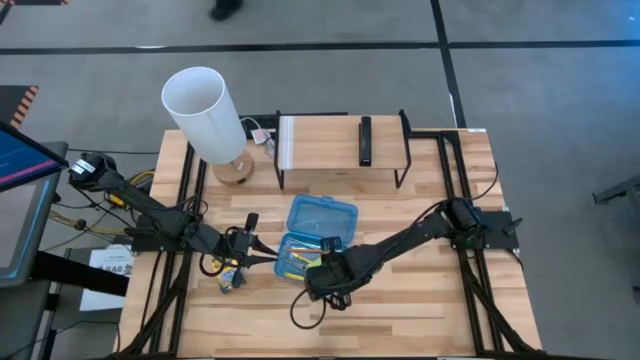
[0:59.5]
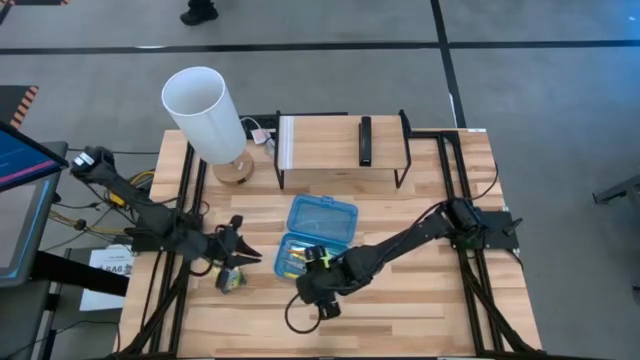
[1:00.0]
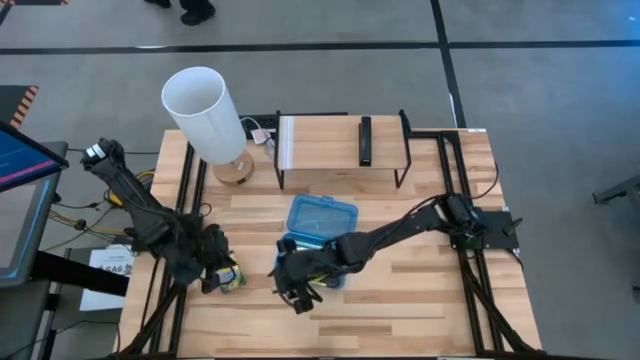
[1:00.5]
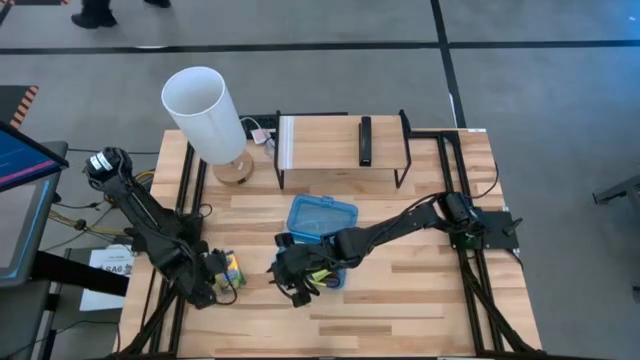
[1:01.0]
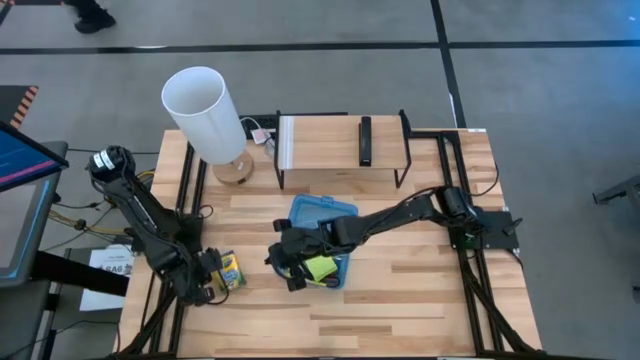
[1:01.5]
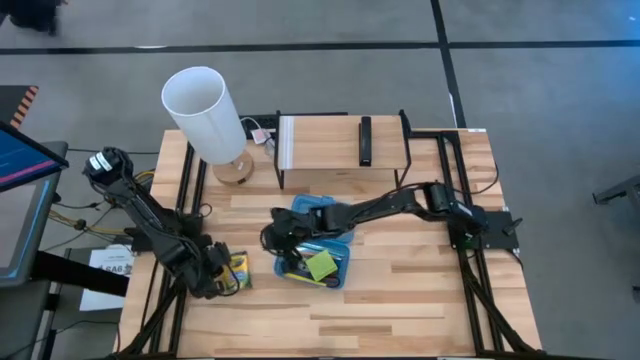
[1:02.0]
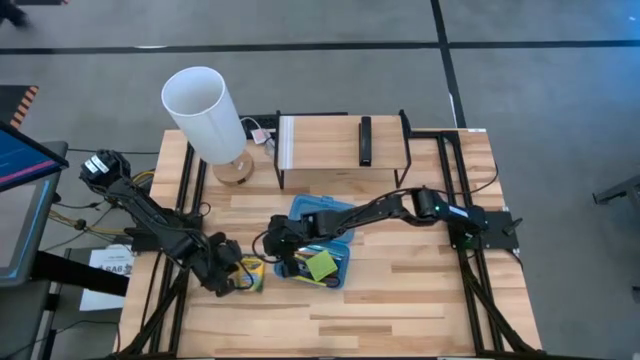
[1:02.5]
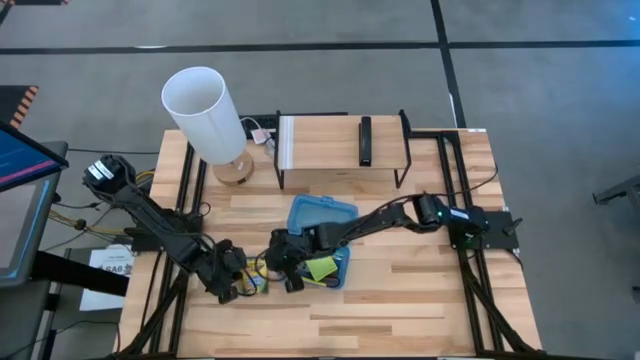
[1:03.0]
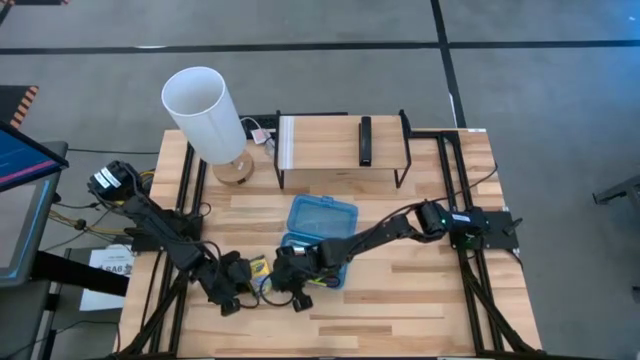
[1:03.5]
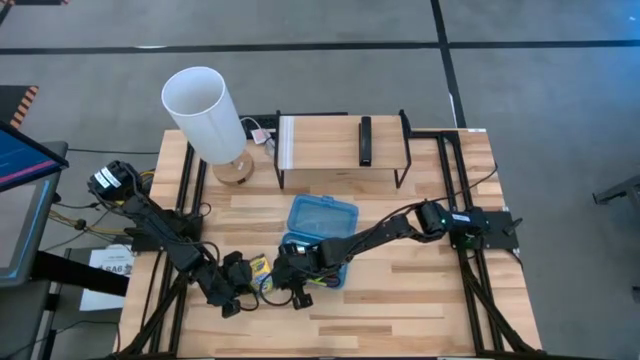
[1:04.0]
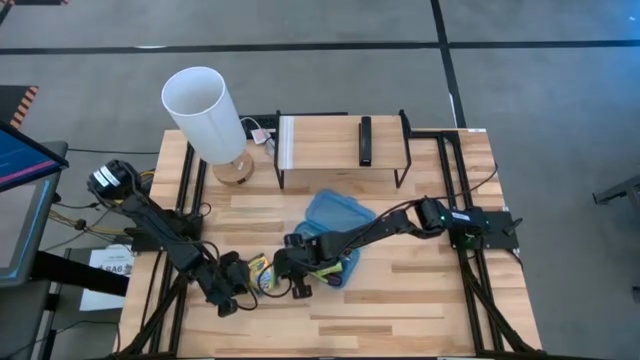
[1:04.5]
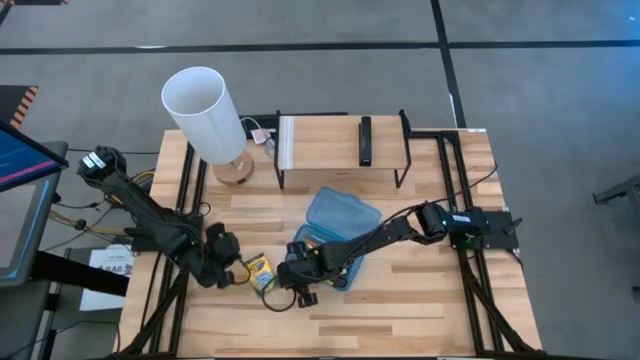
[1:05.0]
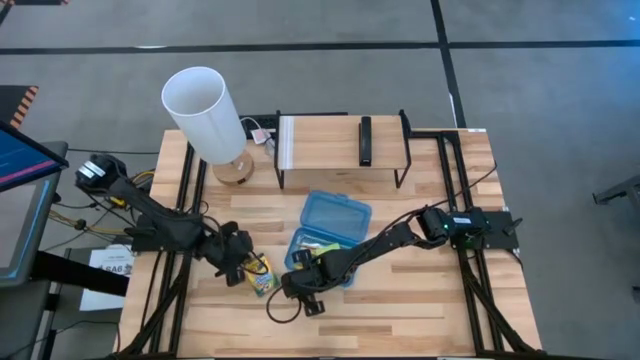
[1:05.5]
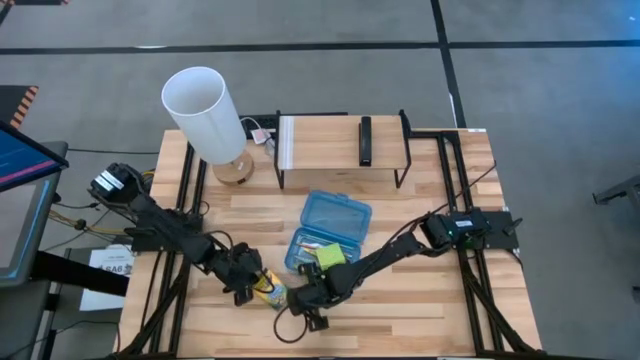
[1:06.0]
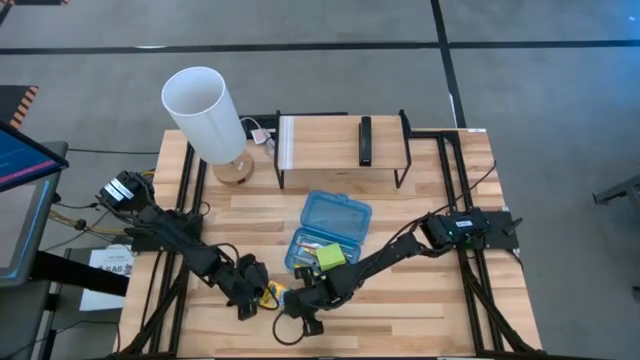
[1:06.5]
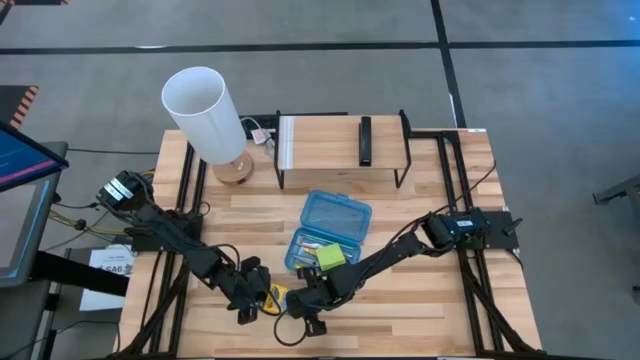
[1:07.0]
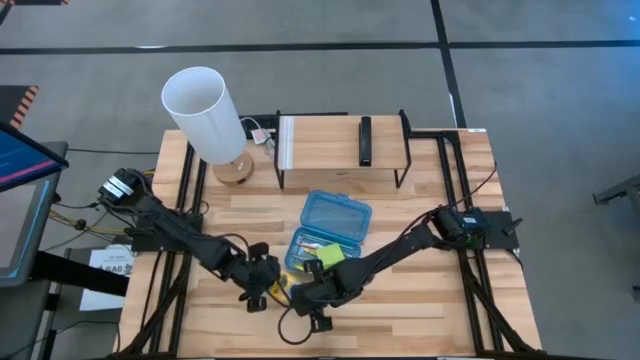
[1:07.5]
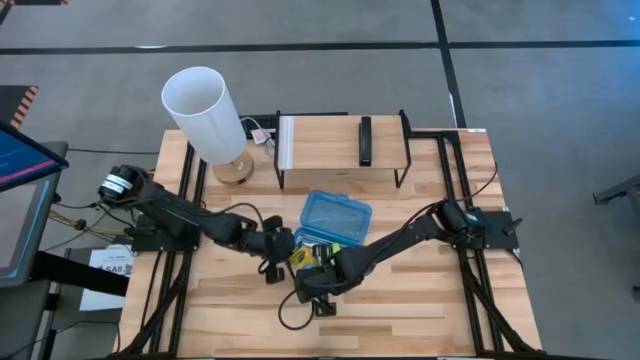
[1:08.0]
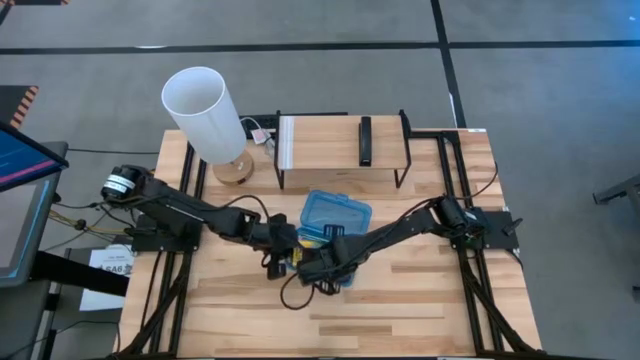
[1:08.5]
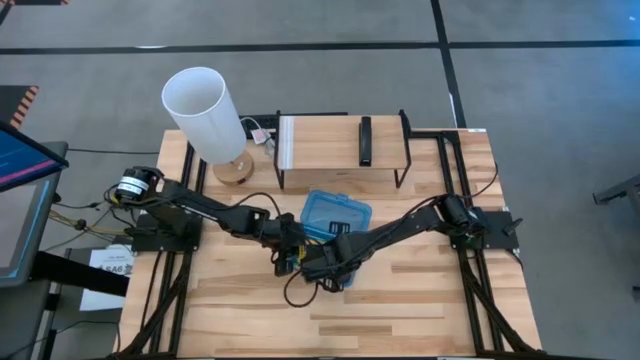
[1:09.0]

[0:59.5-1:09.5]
Task: Pack school essentials
Put the yellow crayon box into the blue supply box

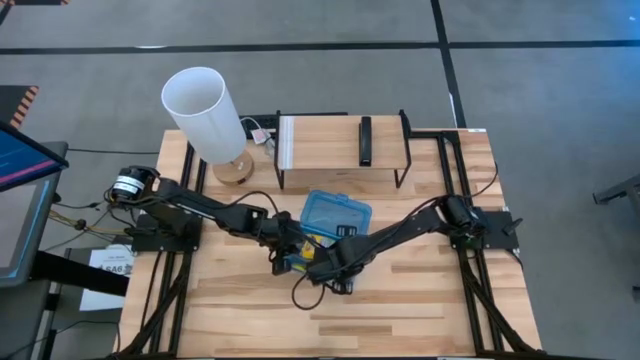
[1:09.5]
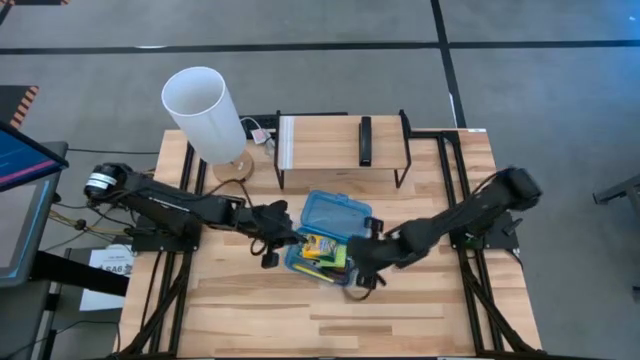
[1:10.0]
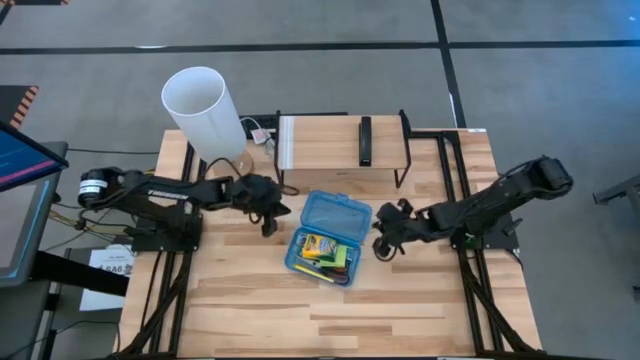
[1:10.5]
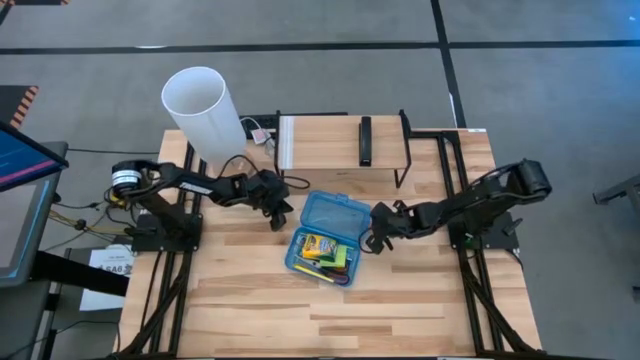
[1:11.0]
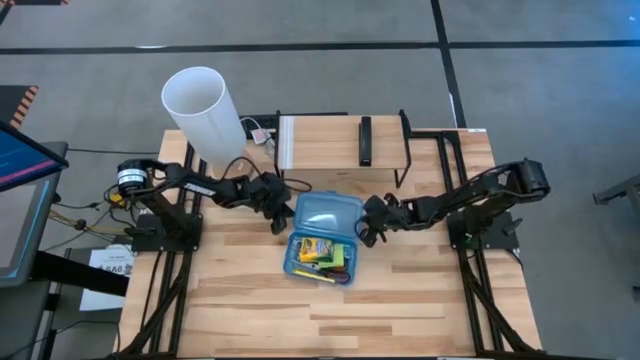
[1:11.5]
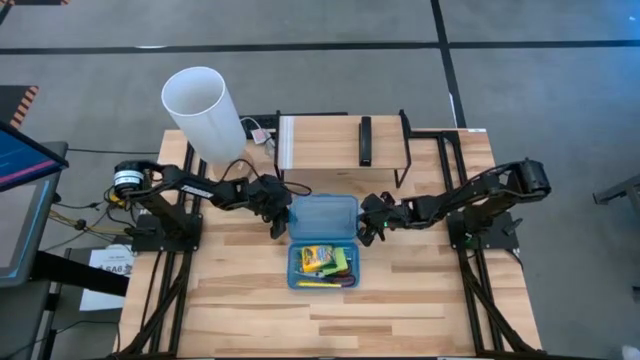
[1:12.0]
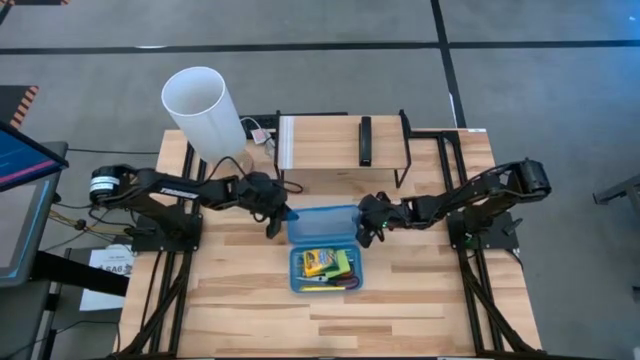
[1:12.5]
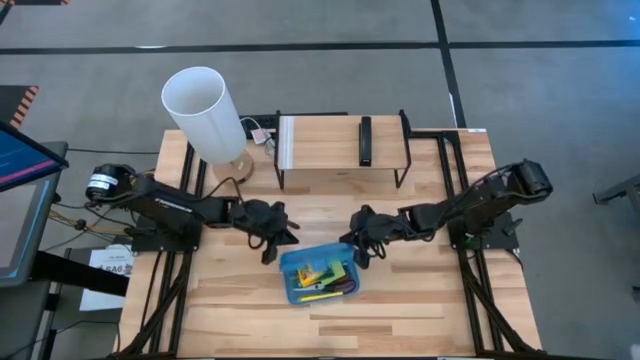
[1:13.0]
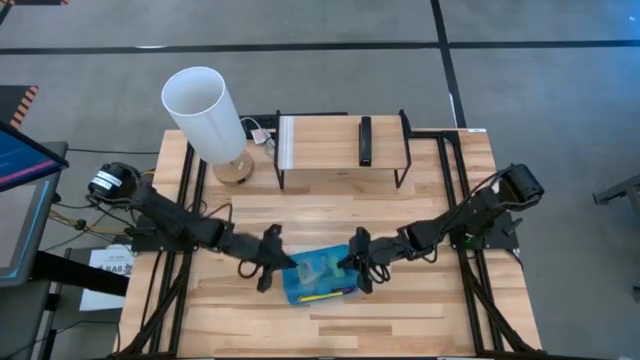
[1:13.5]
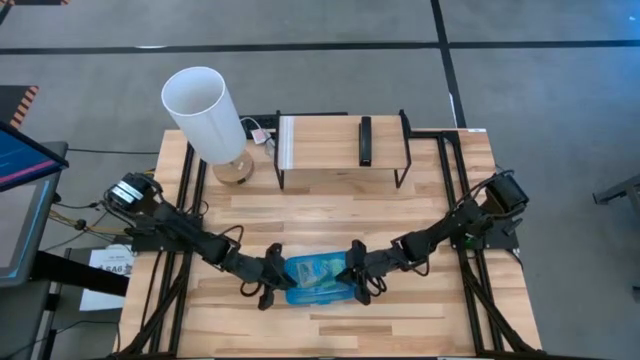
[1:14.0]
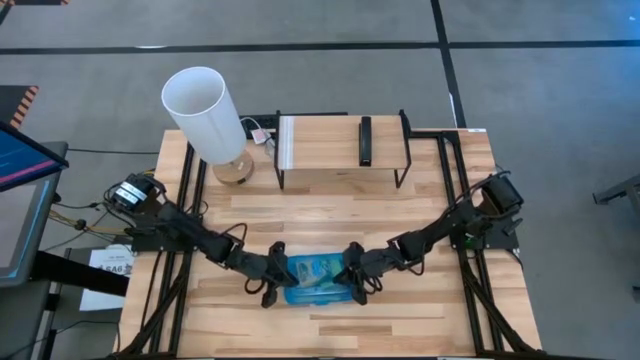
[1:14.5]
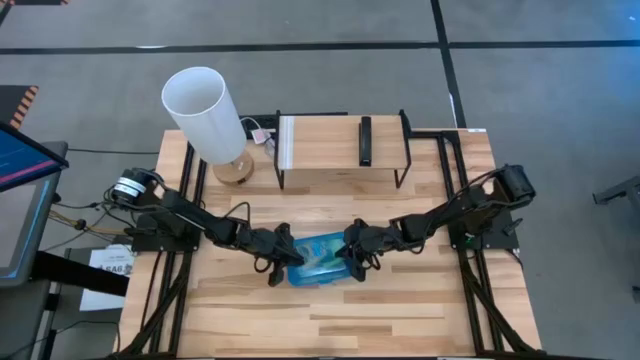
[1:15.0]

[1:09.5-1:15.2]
Close the blue supply box

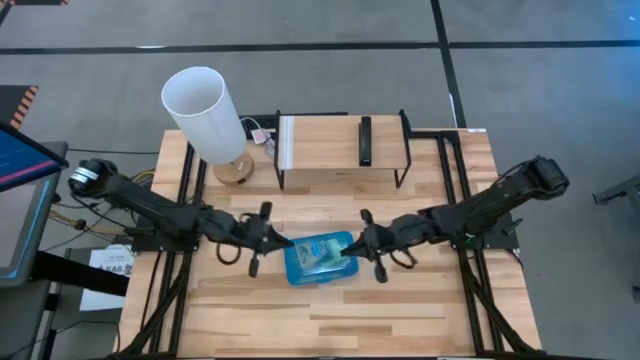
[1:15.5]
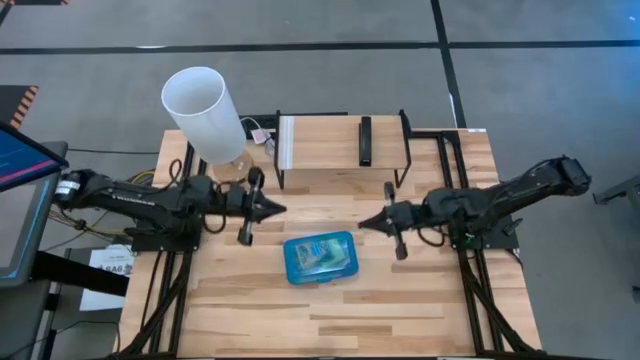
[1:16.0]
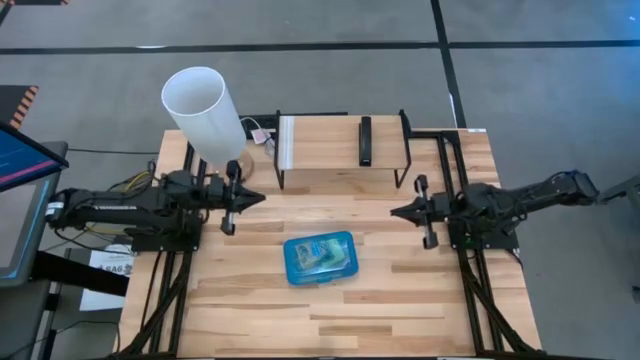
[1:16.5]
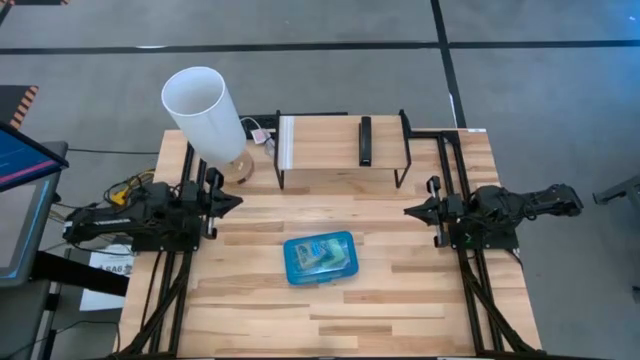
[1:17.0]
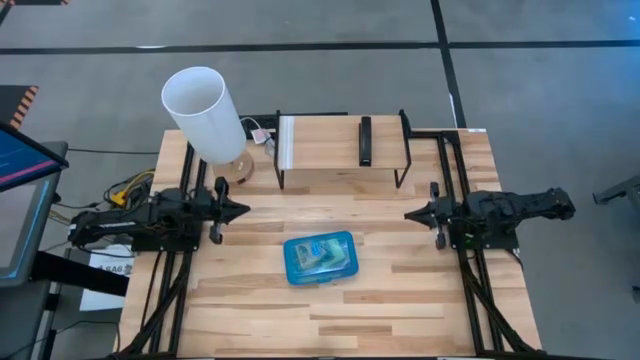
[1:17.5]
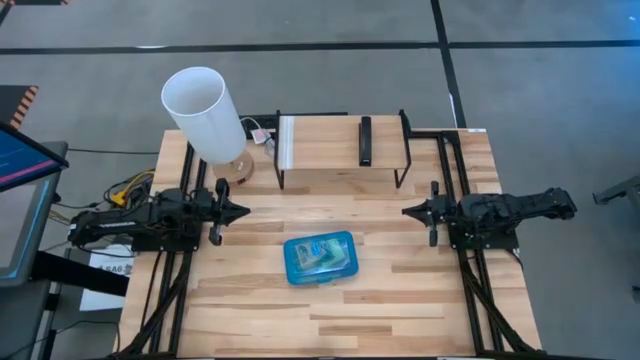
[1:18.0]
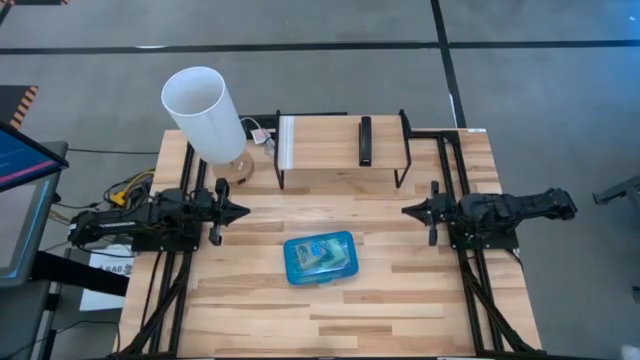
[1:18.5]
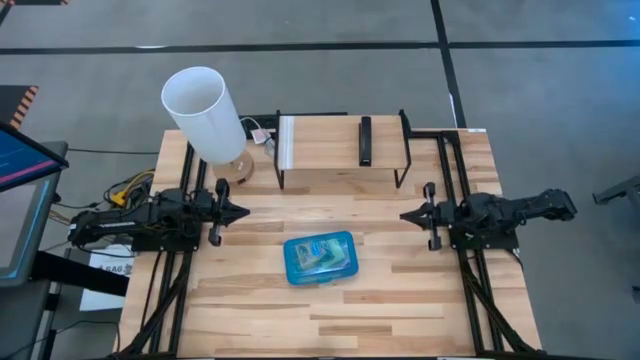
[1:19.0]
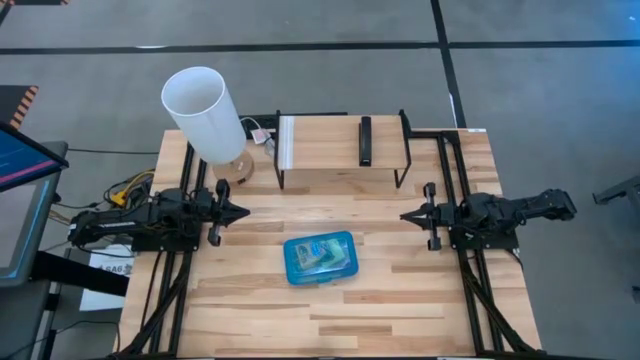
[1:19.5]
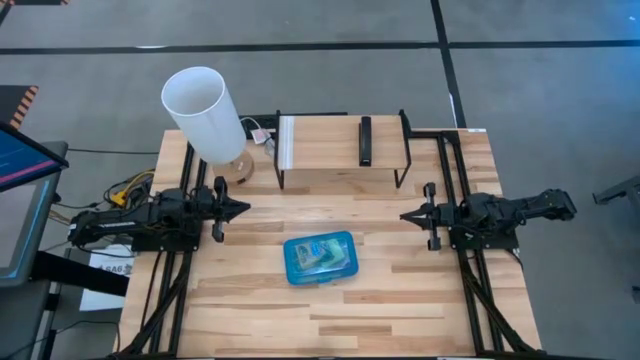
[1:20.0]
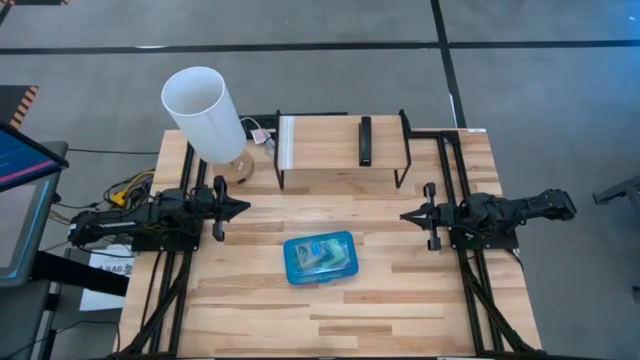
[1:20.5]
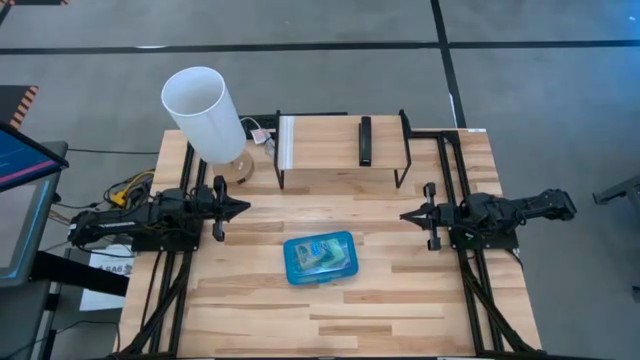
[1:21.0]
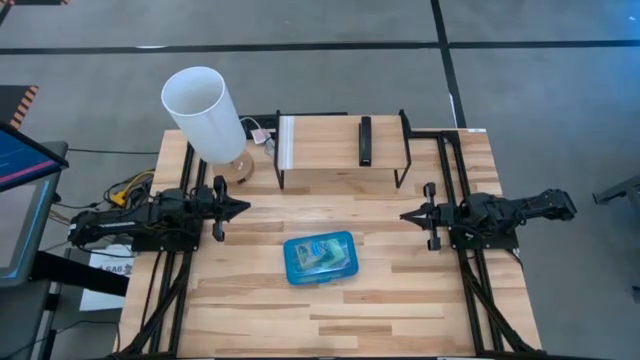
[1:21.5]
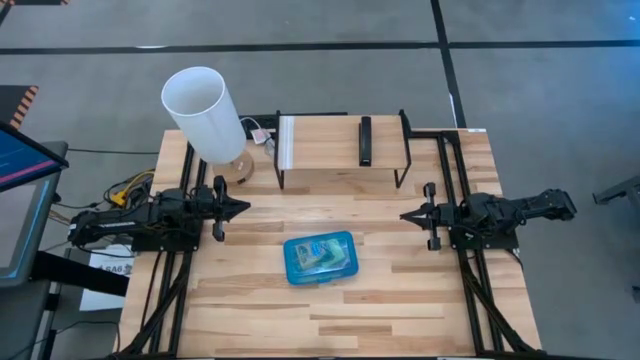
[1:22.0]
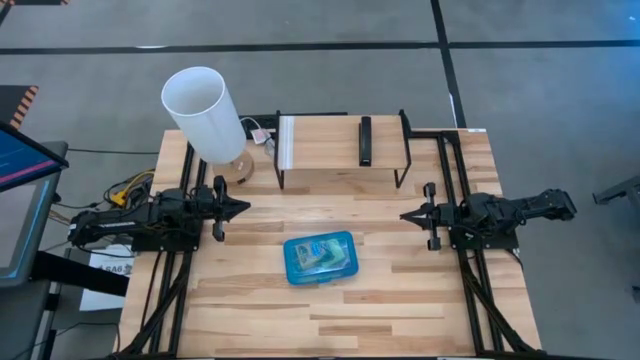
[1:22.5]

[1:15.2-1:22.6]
Return to Home Position
